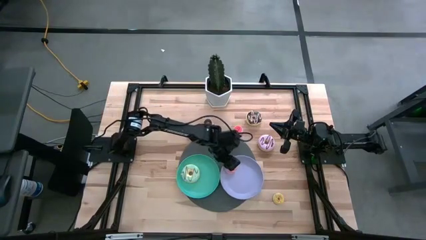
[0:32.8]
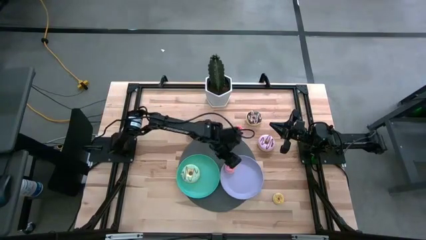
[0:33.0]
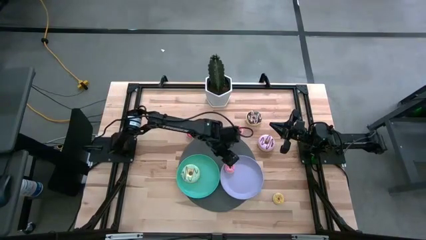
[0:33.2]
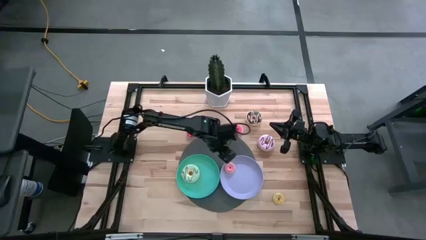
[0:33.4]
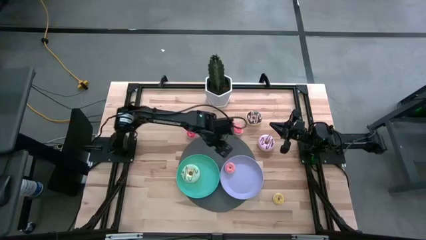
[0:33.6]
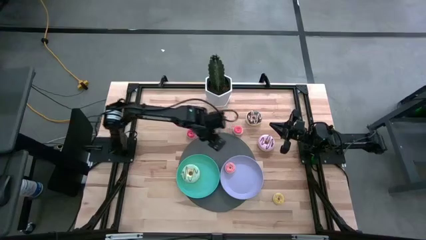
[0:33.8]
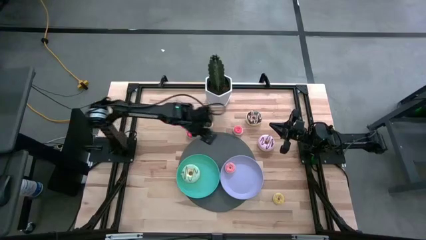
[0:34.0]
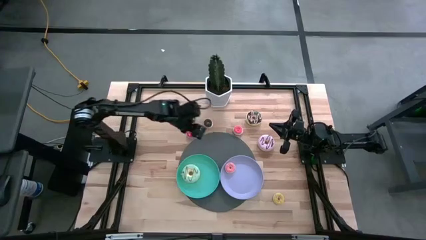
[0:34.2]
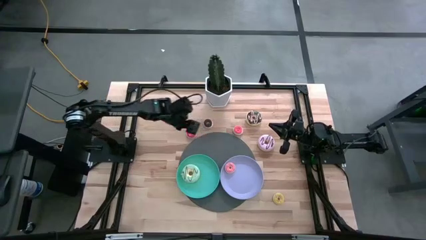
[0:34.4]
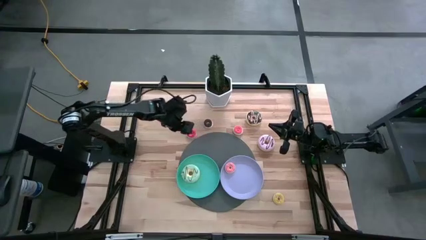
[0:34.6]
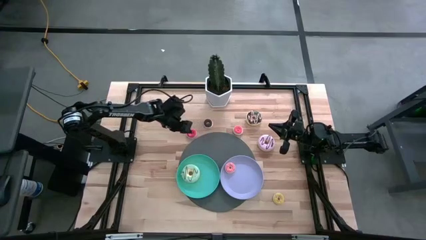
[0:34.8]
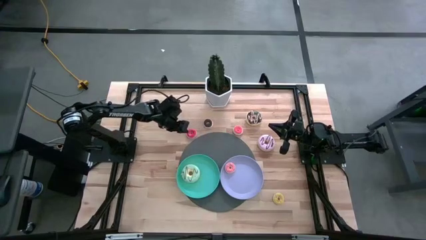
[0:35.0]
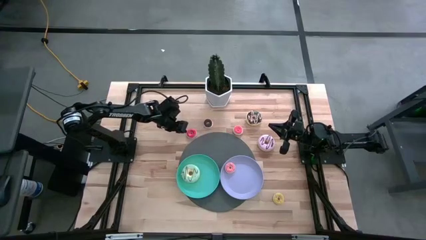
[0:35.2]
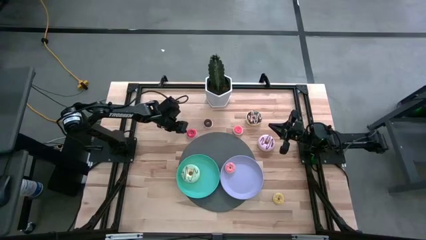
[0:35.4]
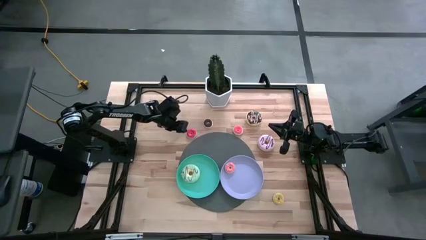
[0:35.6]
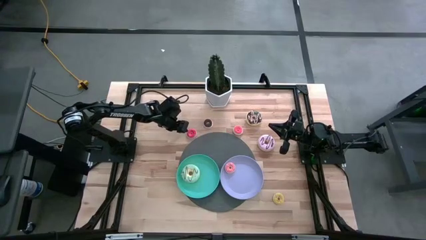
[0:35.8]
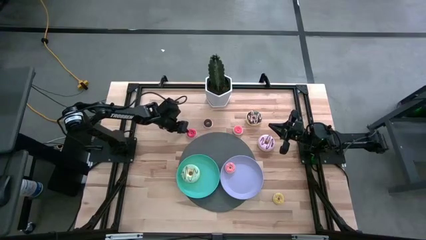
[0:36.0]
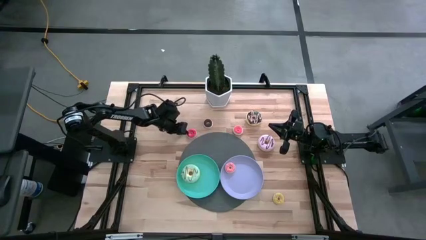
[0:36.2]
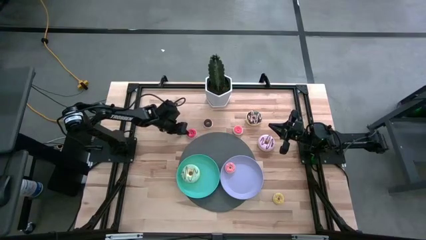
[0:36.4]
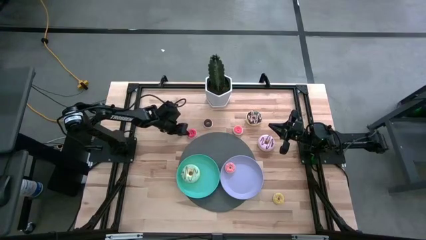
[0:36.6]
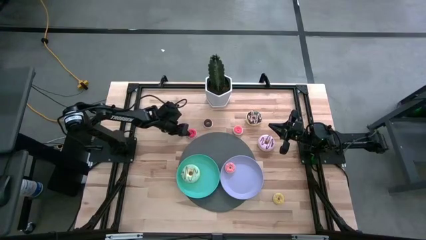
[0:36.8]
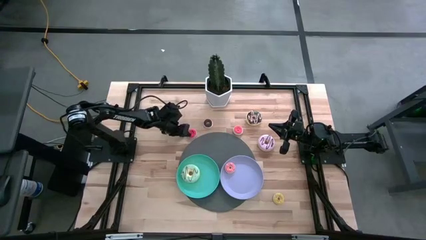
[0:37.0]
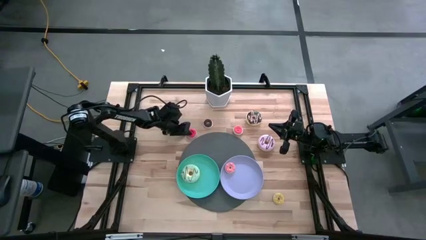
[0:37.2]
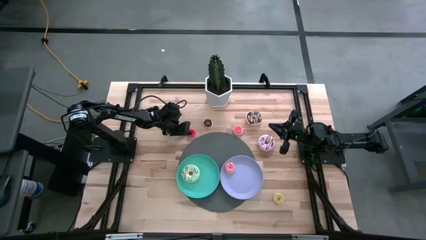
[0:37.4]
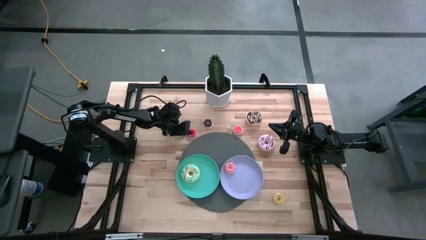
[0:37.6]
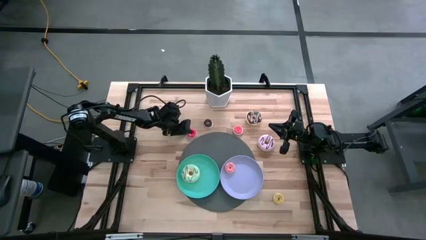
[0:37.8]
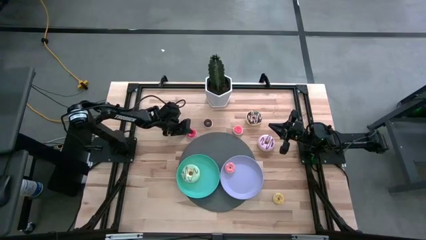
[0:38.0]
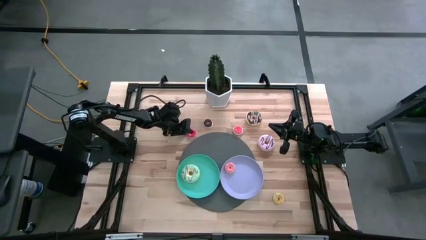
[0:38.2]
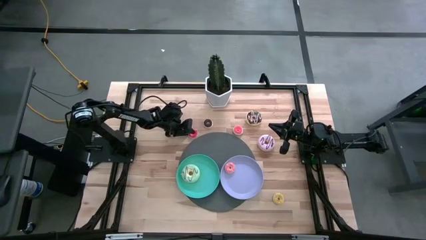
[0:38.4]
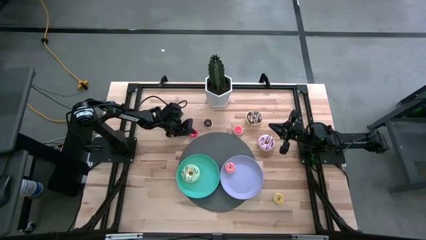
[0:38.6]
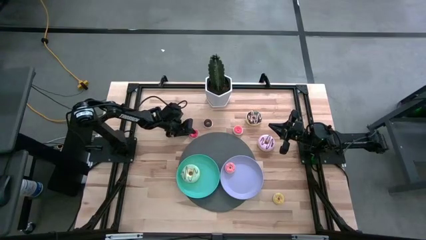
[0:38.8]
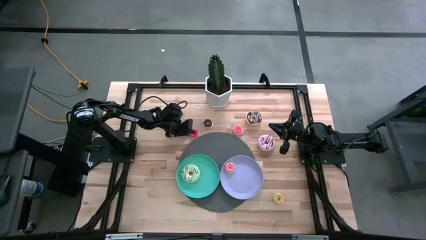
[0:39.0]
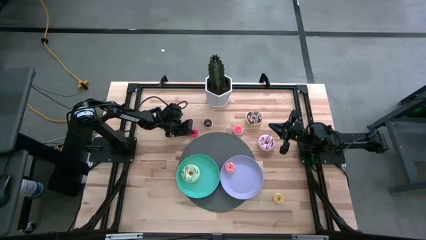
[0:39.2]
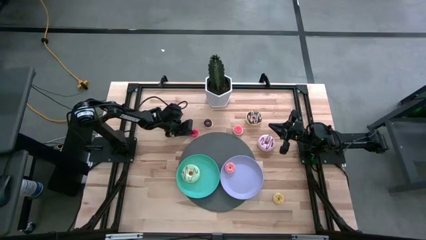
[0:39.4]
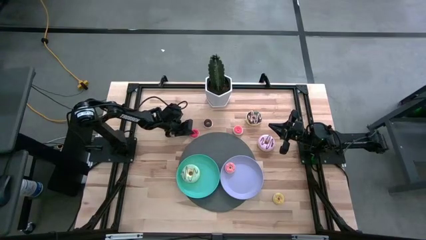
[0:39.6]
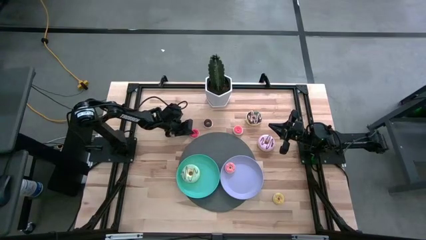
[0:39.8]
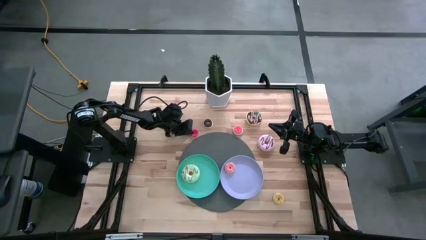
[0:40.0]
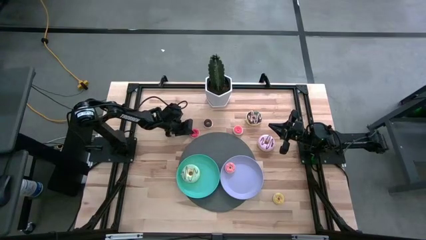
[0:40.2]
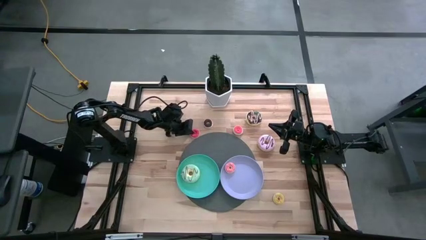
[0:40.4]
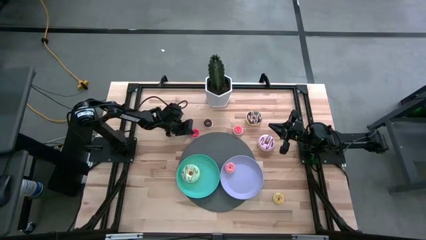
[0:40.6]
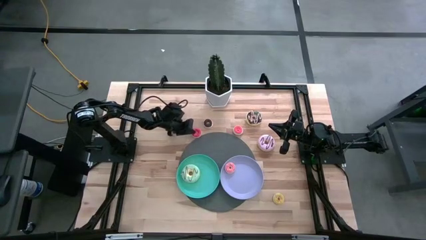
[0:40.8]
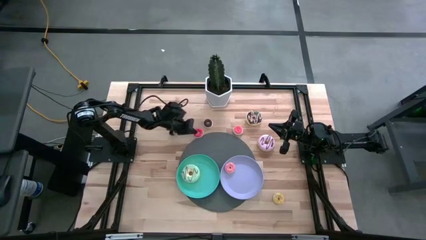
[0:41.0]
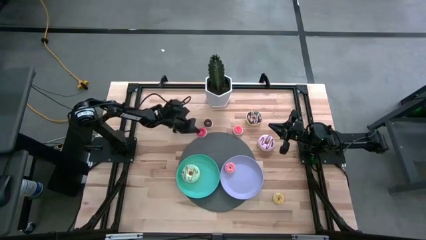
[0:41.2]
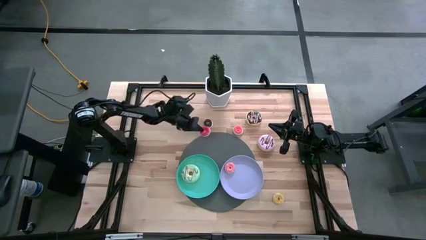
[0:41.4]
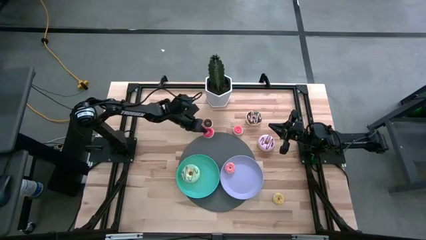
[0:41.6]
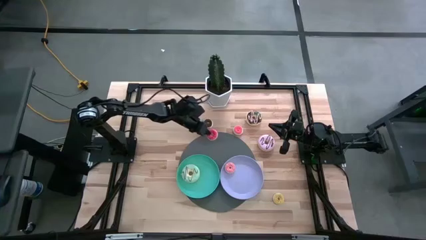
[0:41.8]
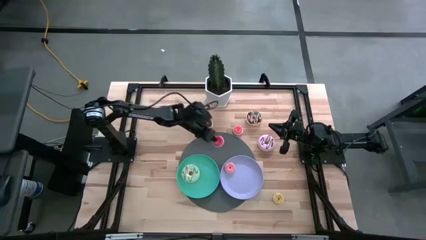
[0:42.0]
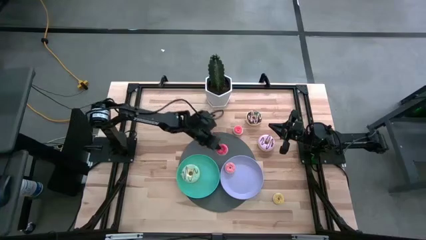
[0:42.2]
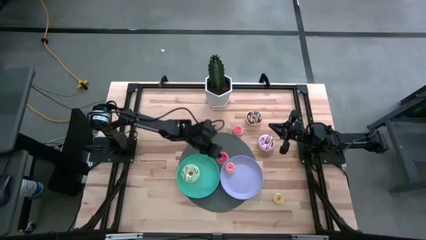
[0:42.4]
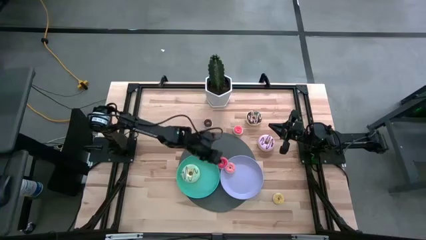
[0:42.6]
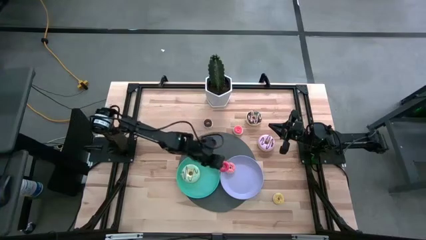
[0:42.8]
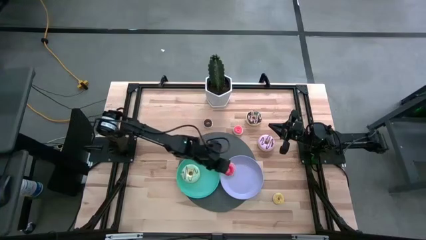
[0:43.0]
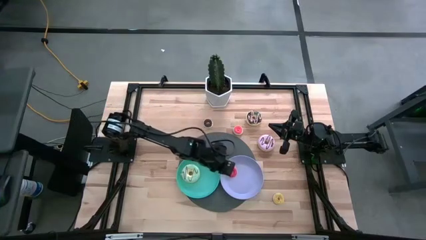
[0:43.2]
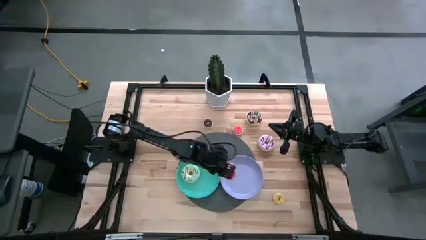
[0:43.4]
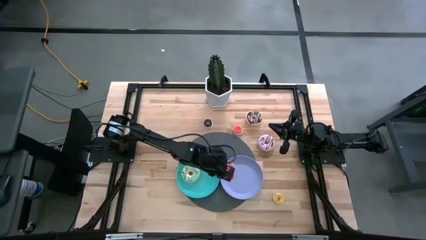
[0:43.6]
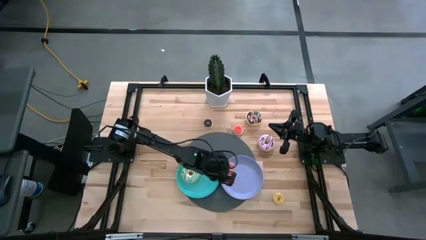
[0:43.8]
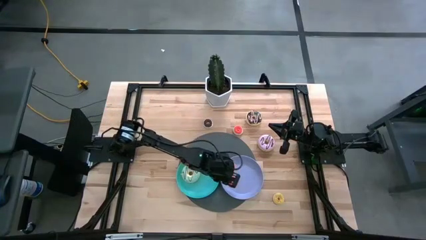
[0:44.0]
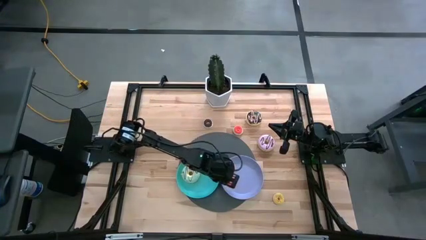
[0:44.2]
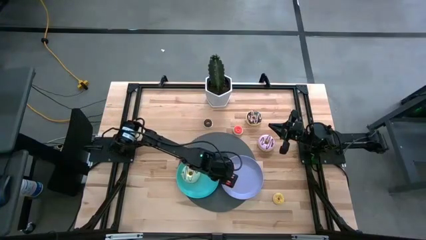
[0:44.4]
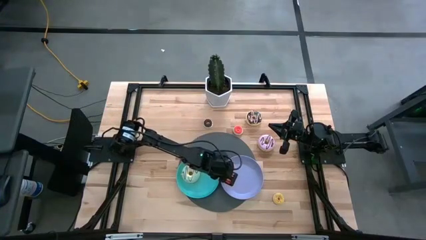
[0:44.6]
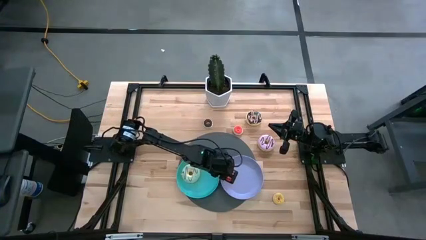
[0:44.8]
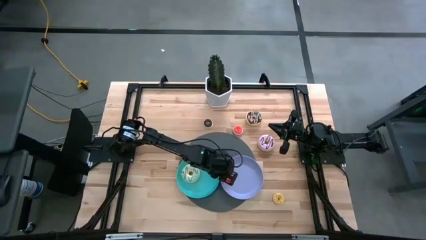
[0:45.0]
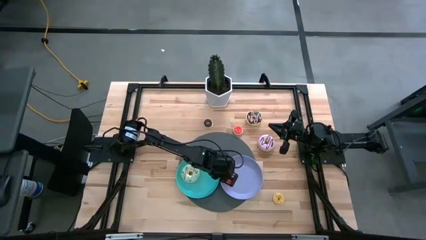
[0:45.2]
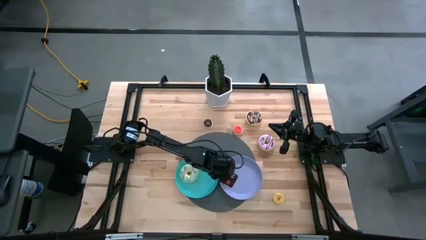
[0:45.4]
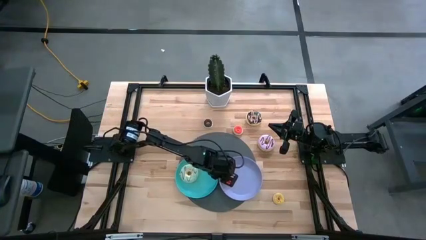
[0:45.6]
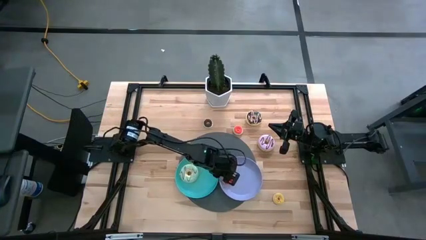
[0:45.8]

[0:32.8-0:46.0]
Task: Pick & Place donuts
Put the small red donut on the purple plate

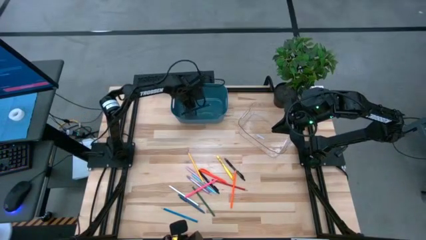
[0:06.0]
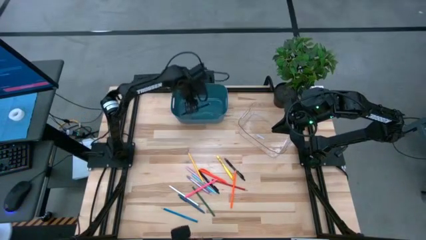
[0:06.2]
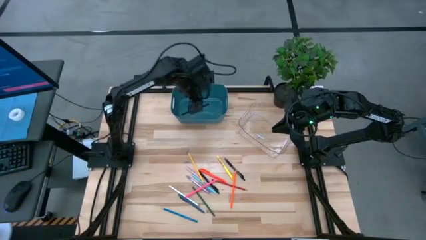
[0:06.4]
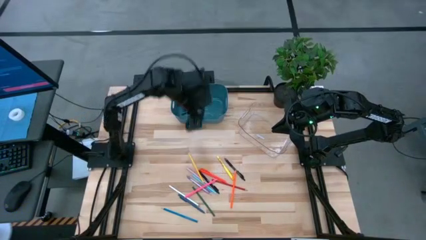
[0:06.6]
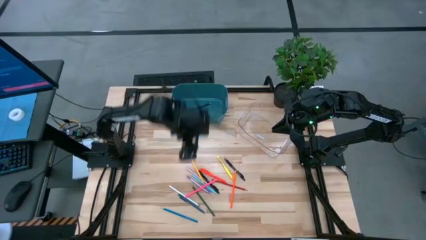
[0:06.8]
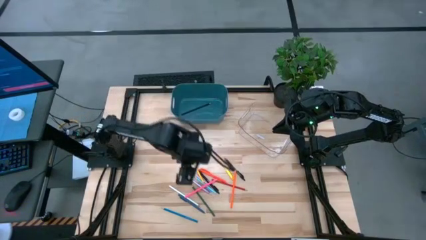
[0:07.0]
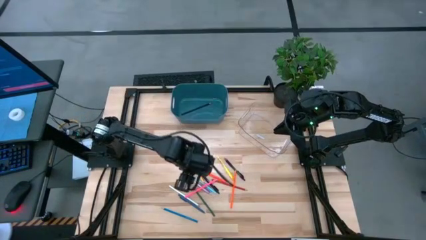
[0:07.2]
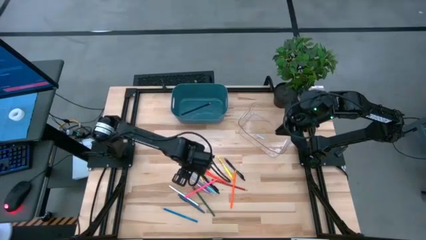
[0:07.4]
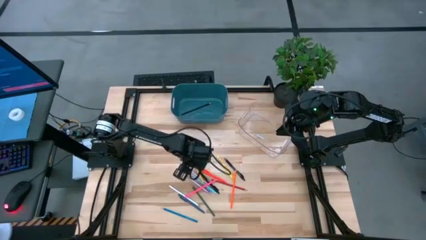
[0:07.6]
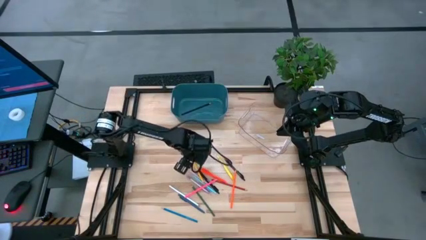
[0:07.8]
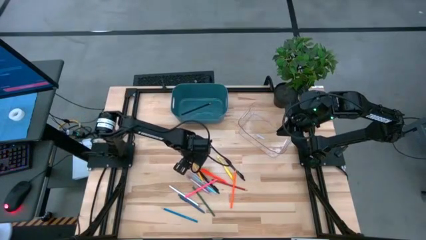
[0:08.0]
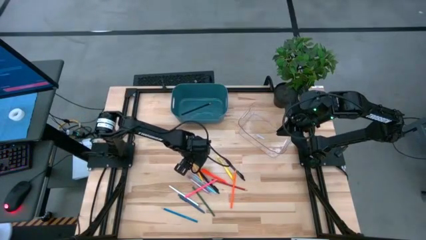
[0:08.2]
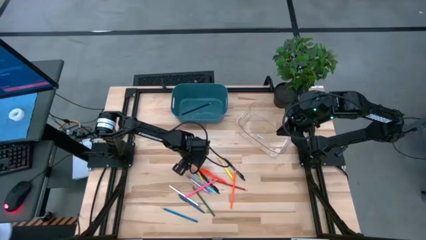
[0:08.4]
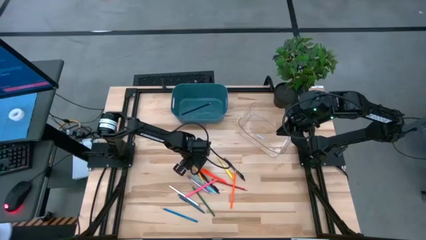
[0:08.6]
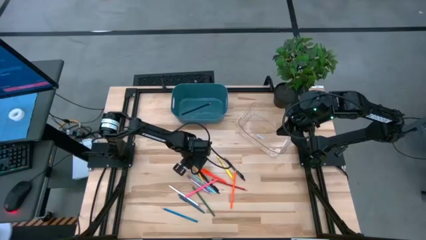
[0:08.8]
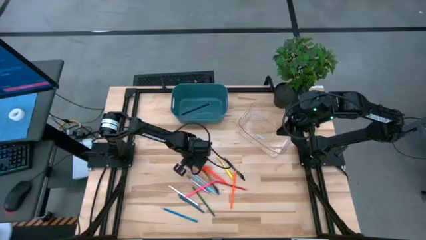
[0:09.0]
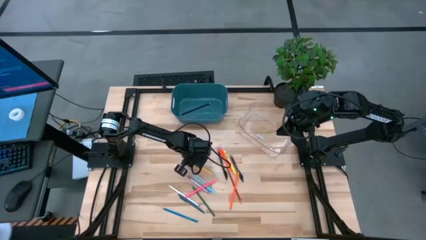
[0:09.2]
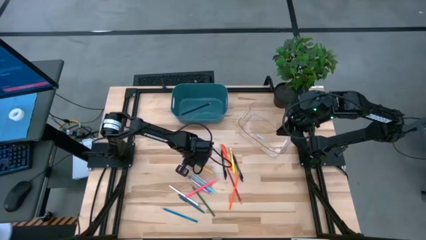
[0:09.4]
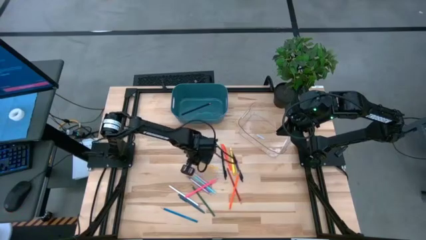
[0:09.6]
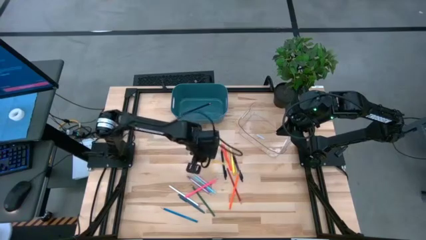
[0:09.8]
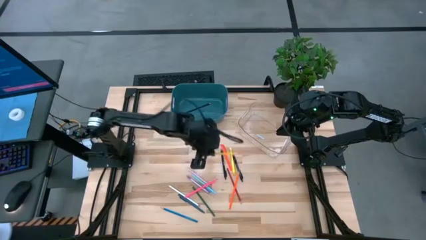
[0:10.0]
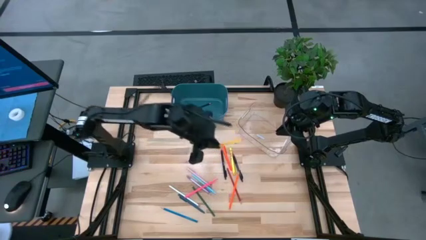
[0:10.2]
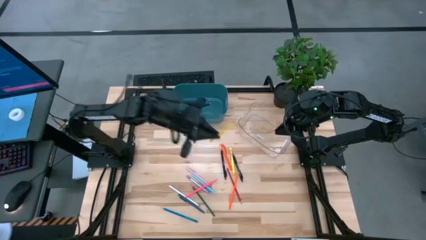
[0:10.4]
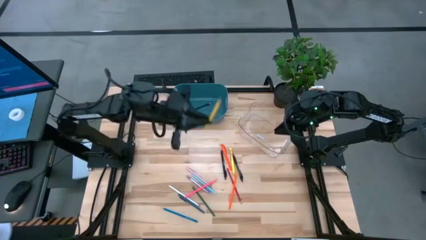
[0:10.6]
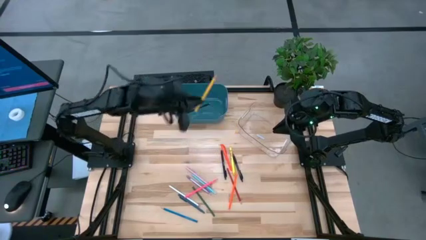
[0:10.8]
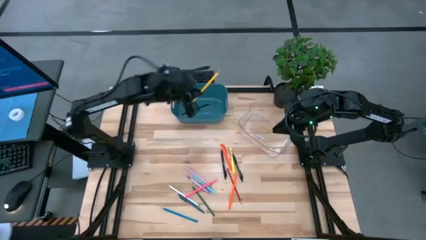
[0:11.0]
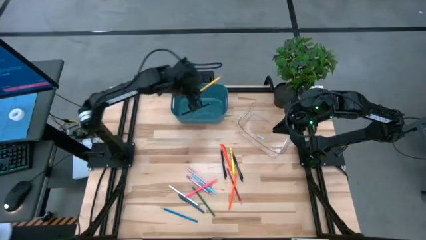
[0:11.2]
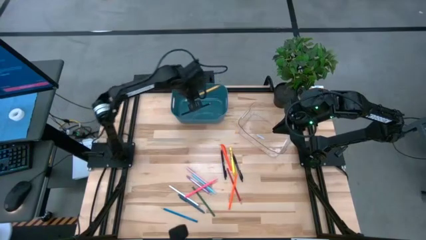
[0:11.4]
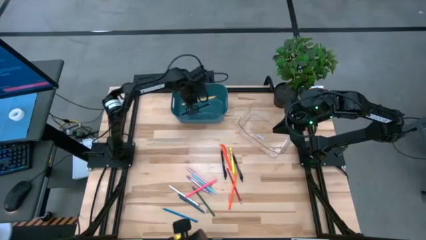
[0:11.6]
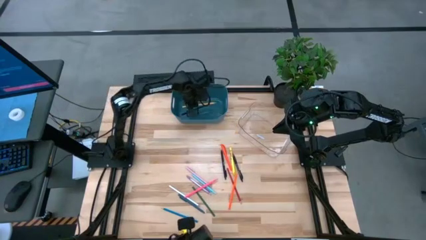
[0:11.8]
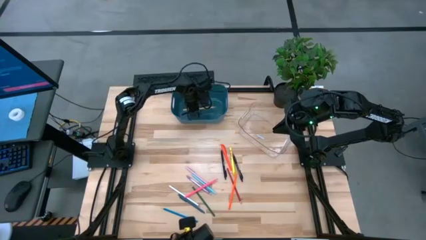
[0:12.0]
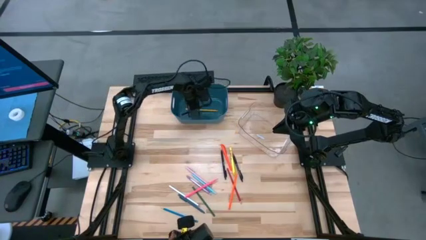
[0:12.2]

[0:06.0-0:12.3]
Task: Sort pens & pencils
Put the left yellow pencil into the blue bin
